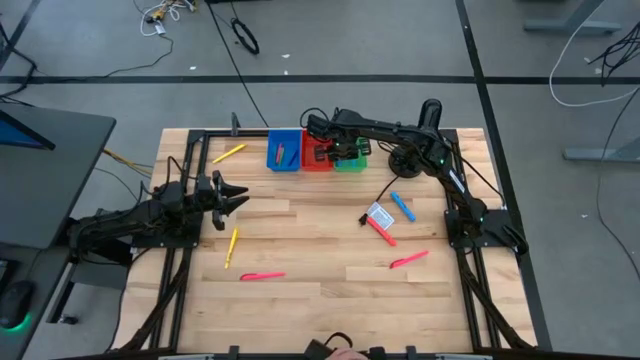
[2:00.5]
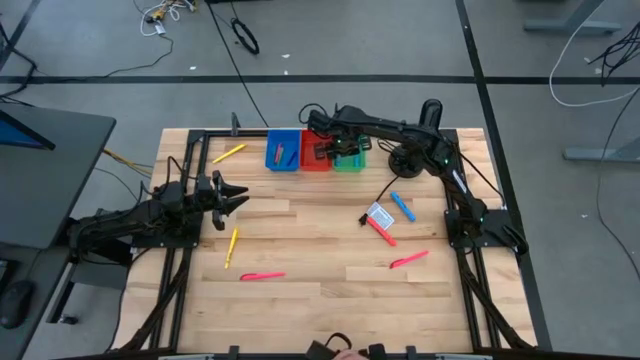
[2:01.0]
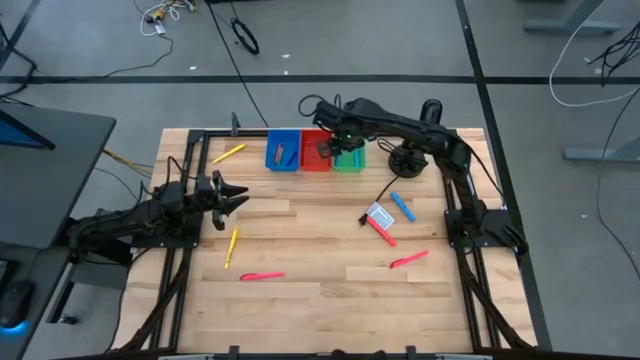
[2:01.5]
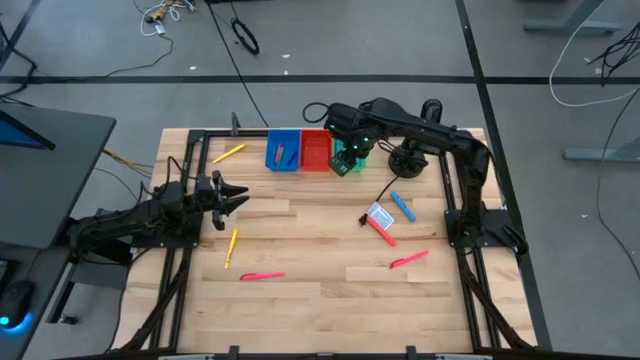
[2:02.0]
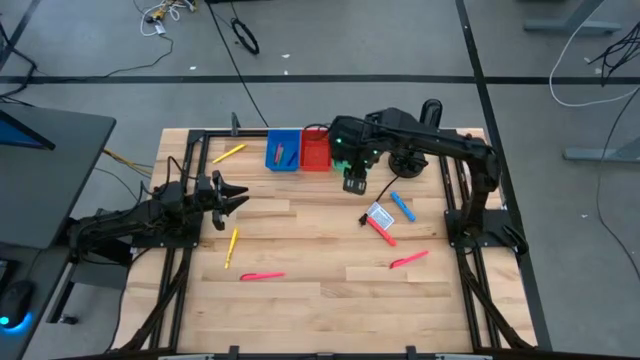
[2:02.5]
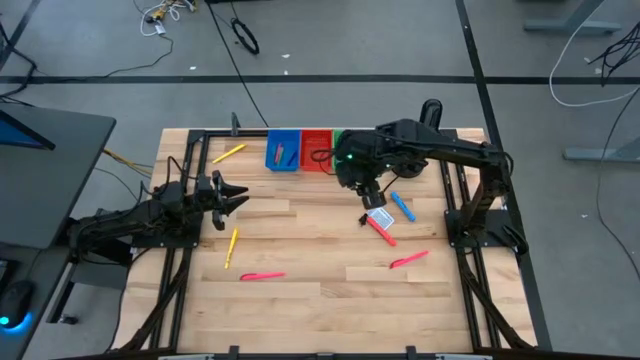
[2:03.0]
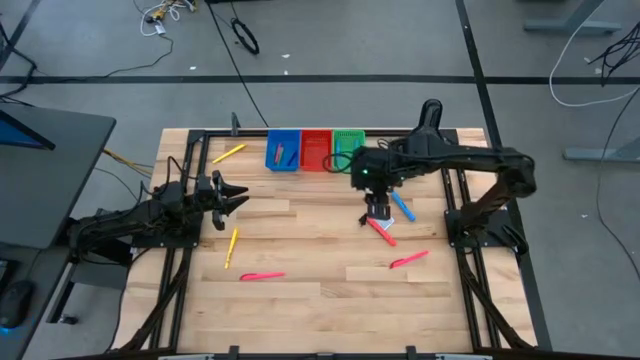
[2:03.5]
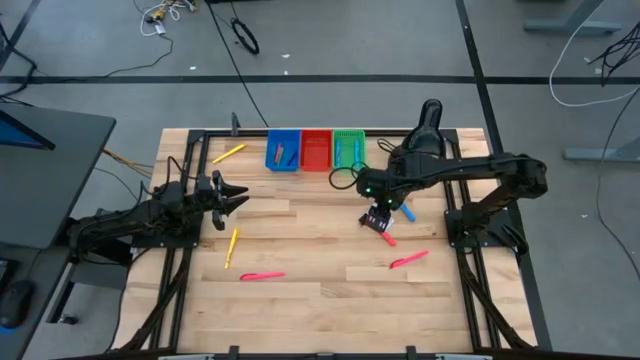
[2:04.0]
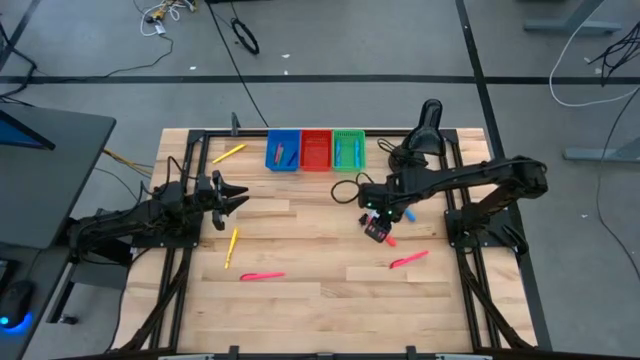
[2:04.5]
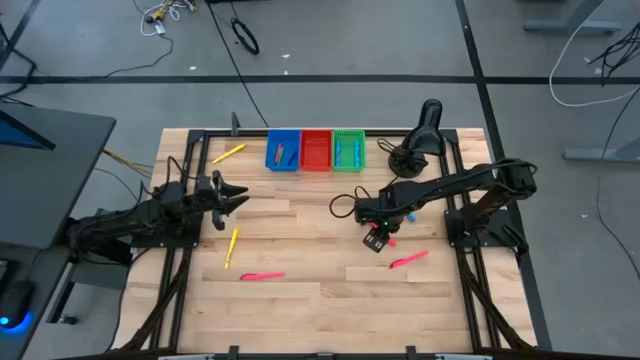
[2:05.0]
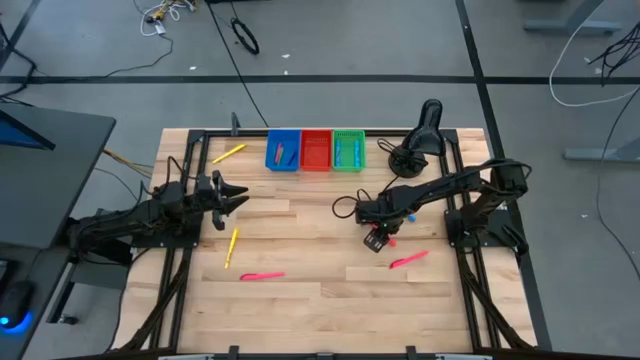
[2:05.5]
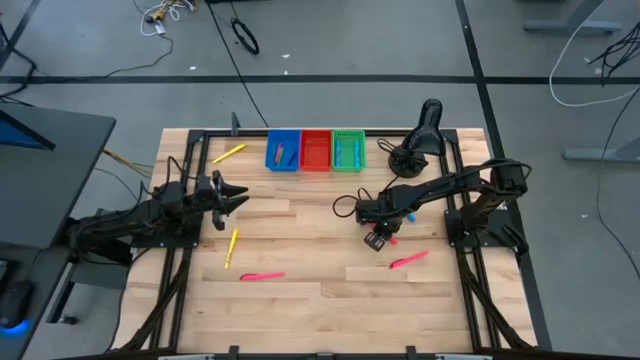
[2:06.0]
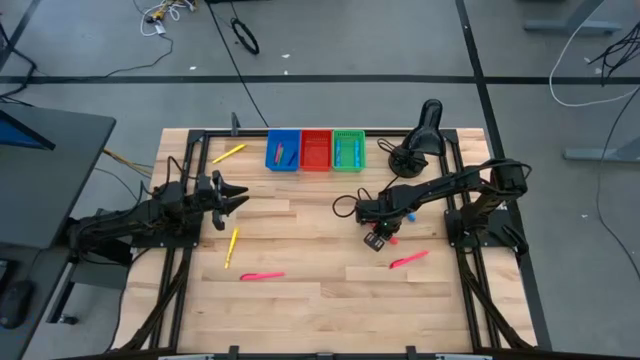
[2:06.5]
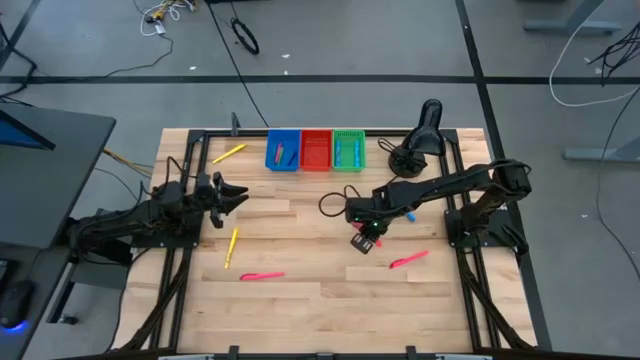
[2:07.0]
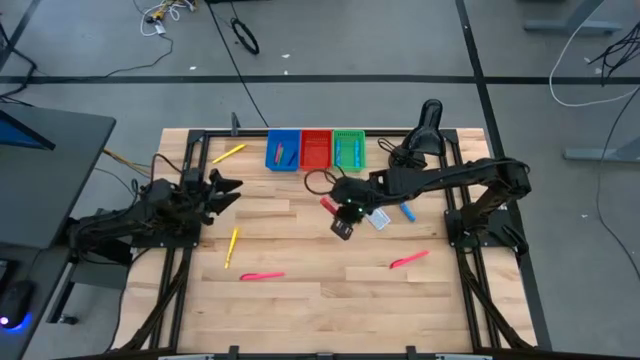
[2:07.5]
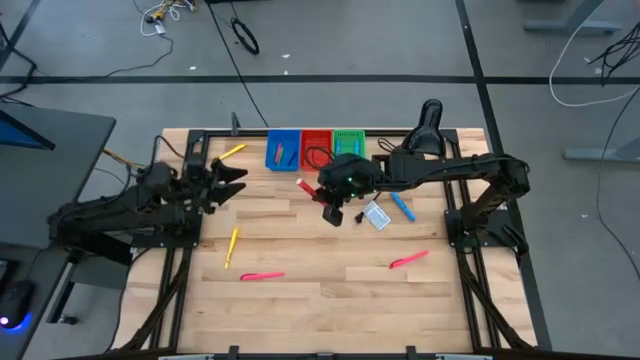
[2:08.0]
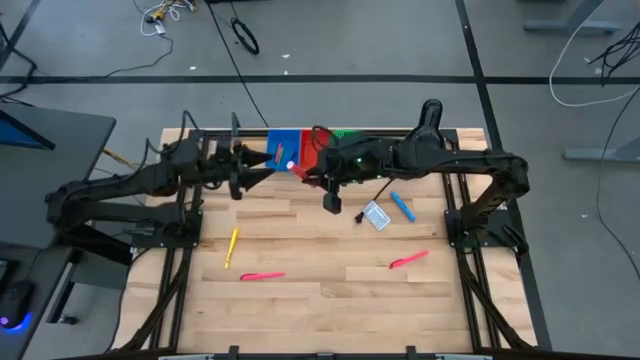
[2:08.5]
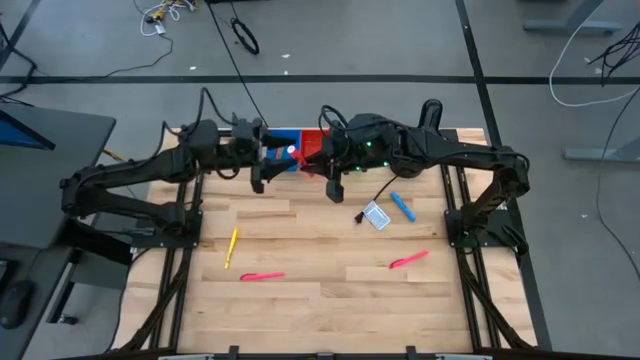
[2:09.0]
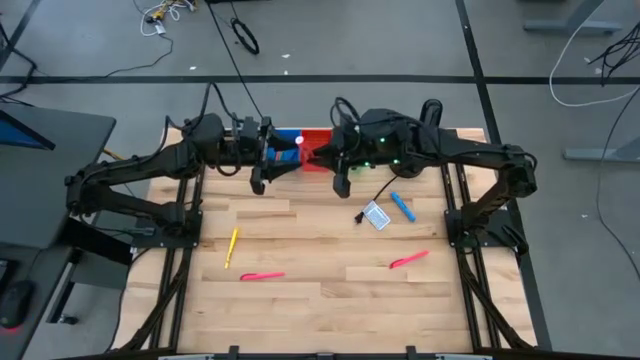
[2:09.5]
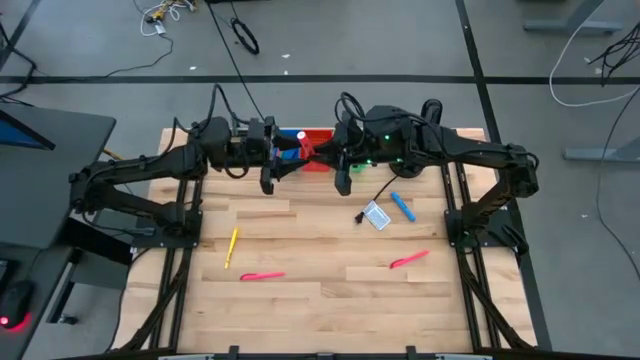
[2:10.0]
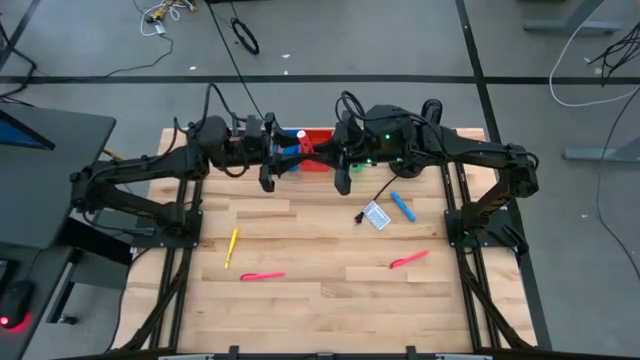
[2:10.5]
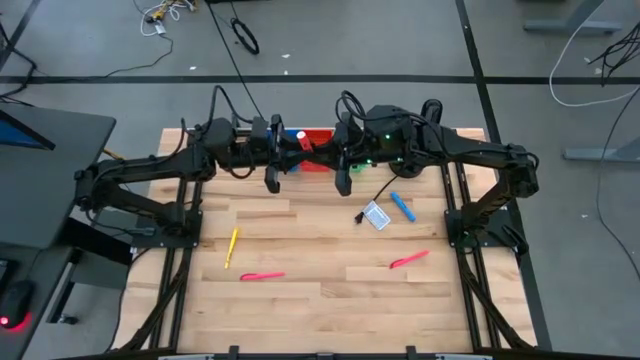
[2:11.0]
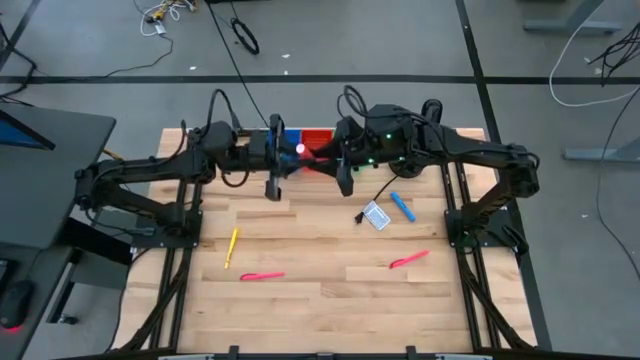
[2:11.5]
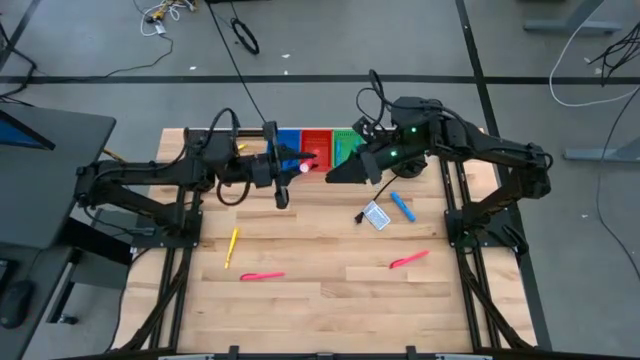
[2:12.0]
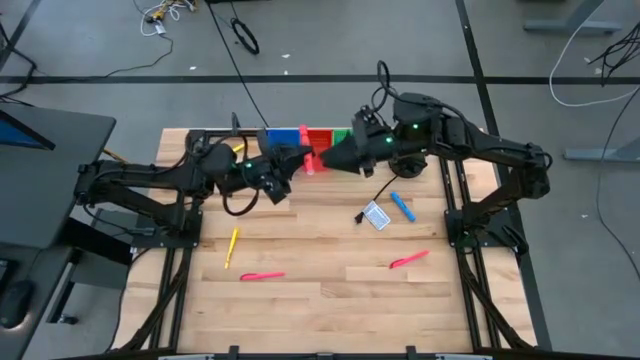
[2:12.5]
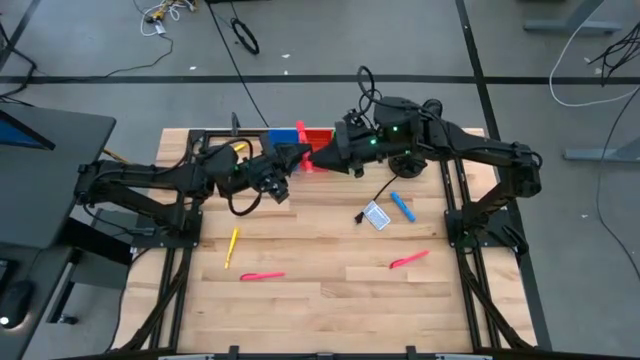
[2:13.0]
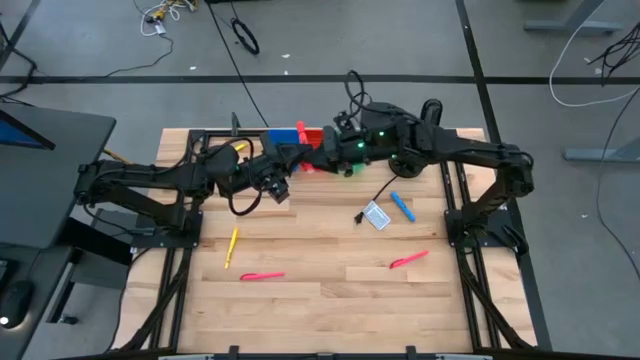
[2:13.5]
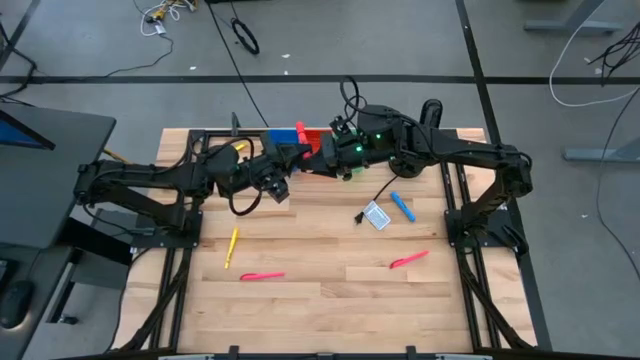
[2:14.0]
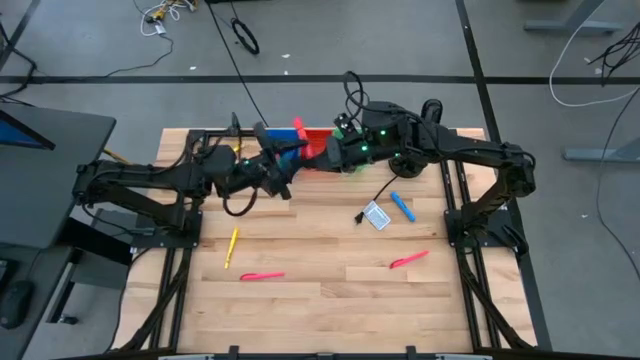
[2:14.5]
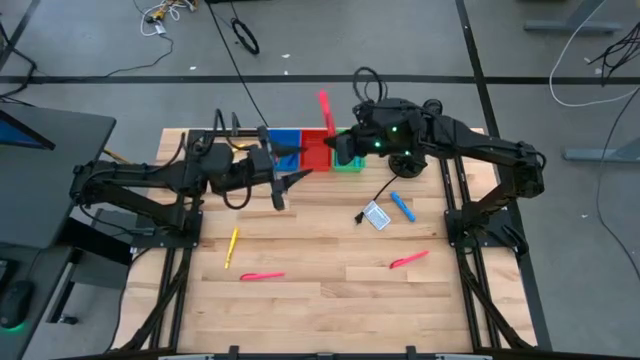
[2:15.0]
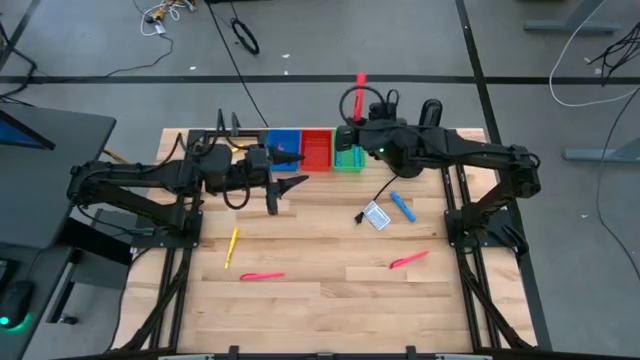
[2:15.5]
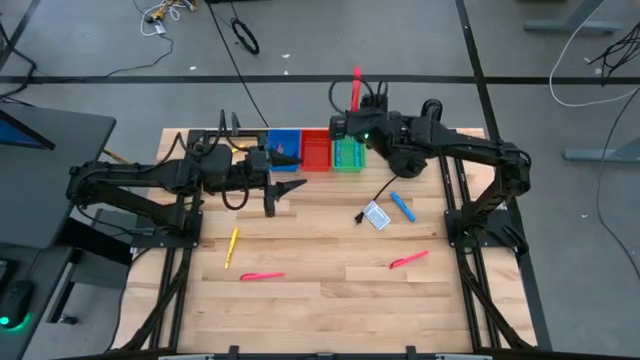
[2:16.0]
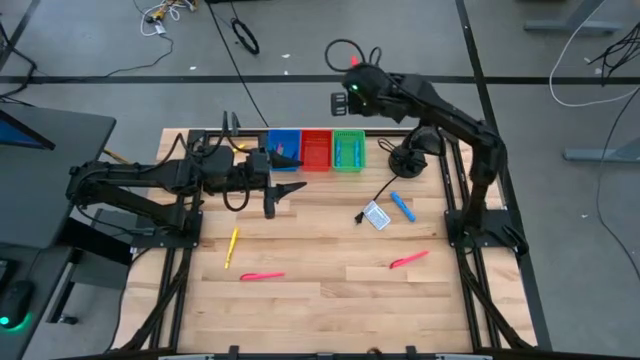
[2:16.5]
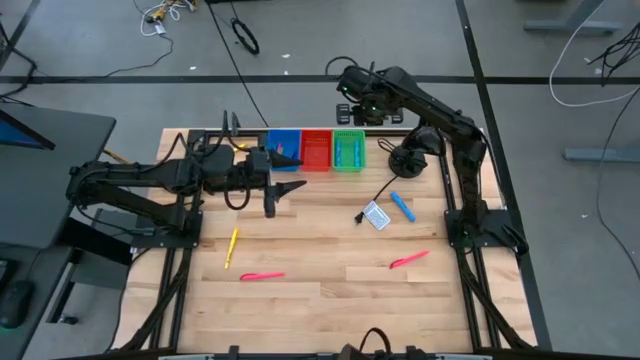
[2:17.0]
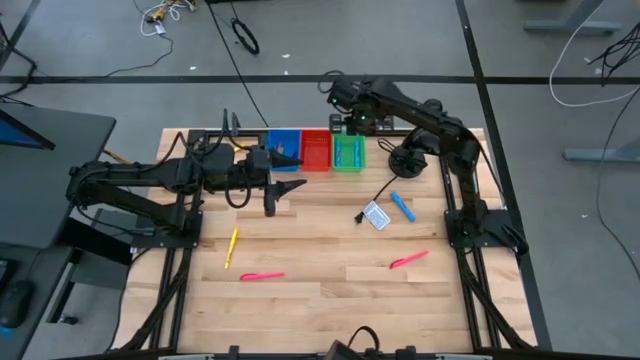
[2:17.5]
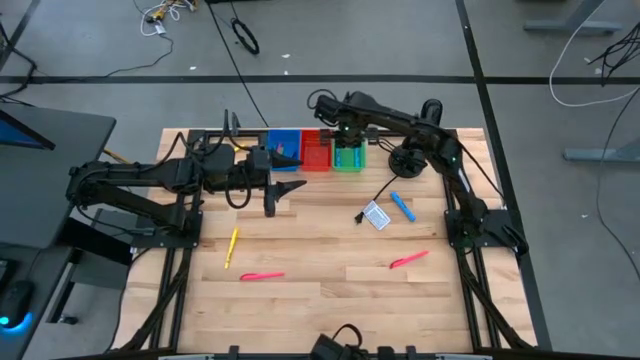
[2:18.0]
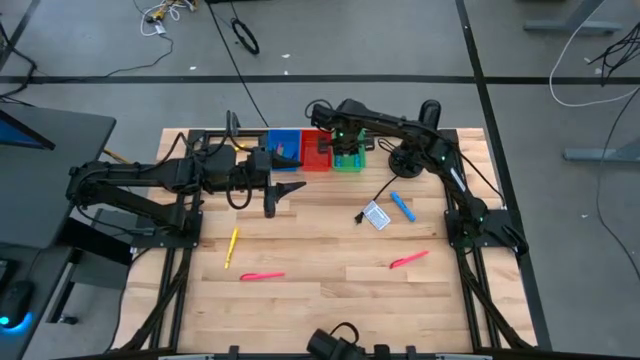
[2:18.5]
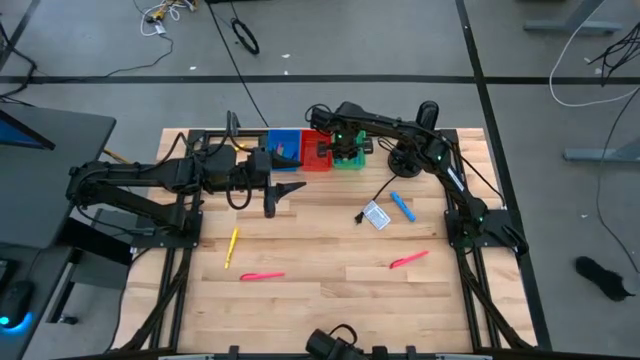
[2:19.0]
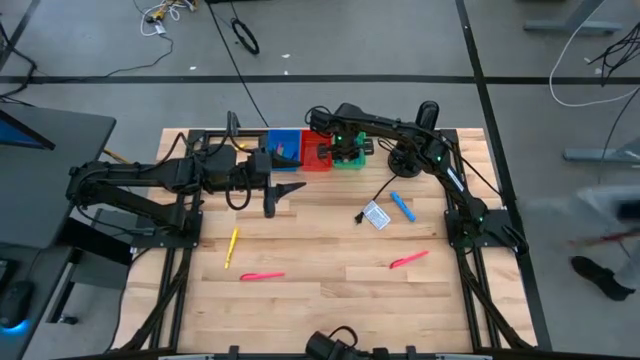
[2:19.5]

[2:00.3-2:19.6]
Task: Pick & Place Markers
Put the orange highlighter into the green bin

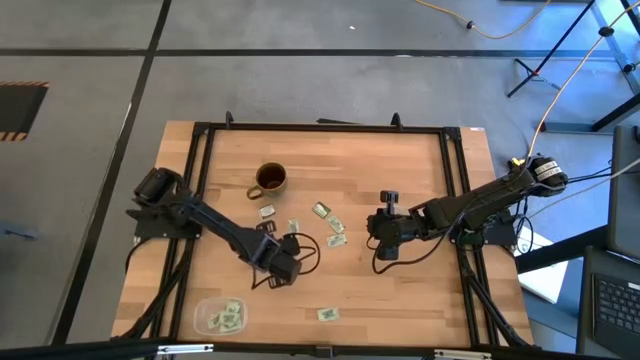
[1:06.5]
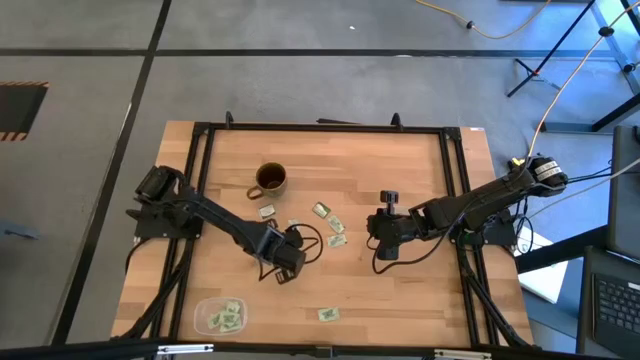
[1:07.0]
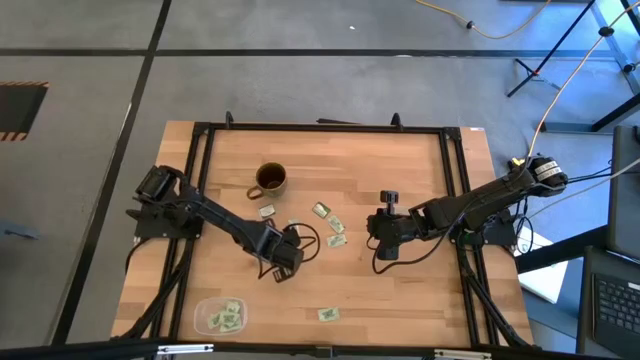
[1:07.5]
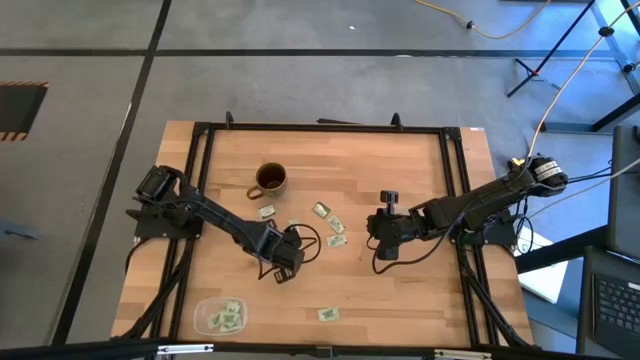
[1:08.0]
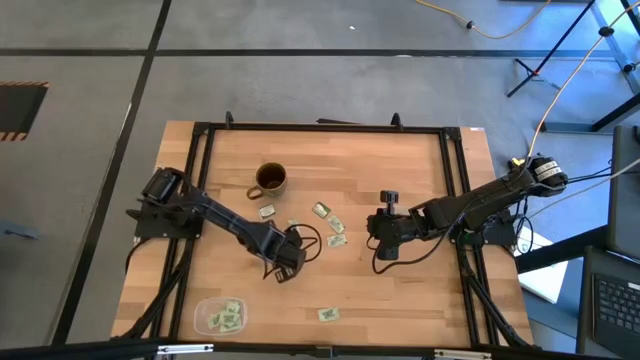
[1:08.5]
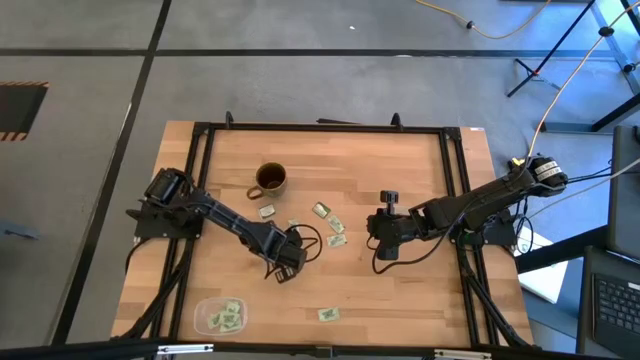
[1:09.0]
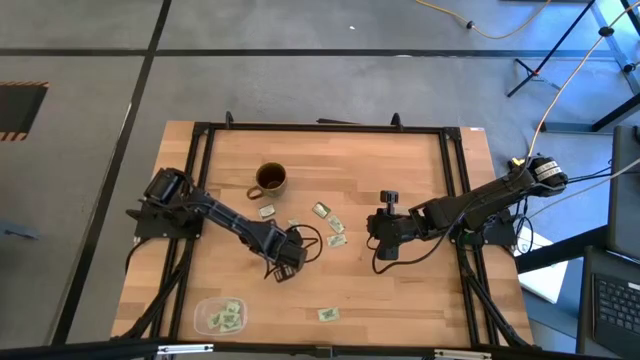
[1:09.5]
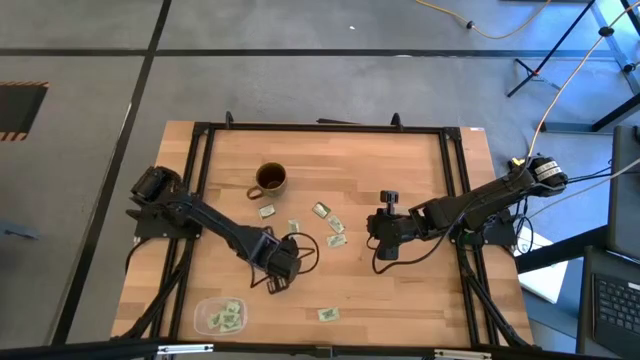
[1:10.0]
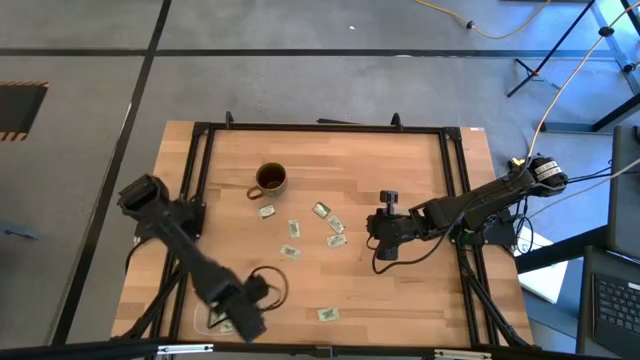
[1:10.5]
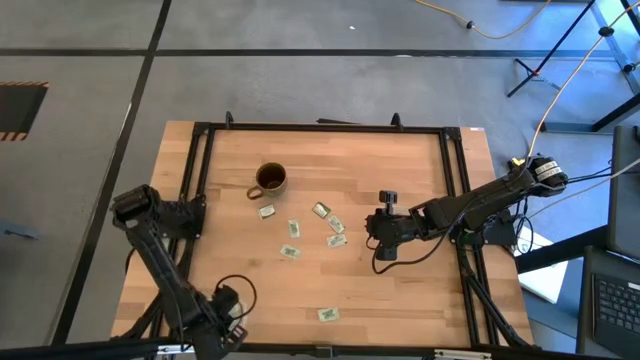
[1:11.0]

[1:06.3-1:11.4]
Task: Pick and place Stevia / Truvia into bins
Put the stevia packet into the bottom transparent container
